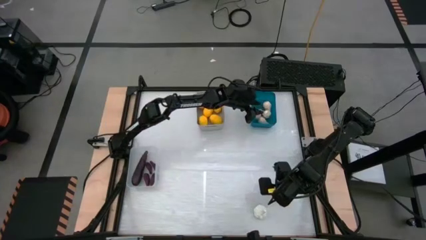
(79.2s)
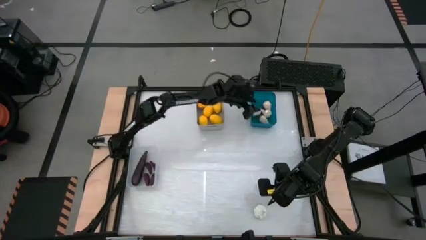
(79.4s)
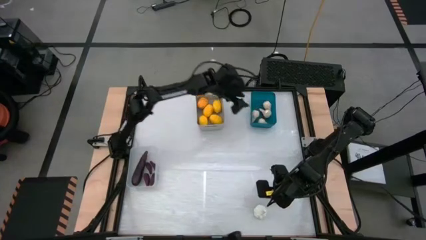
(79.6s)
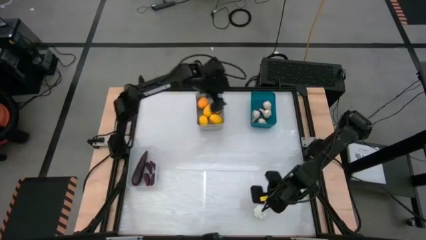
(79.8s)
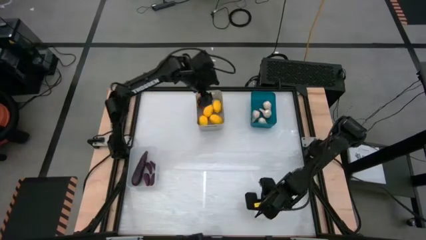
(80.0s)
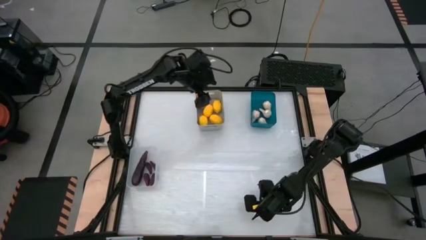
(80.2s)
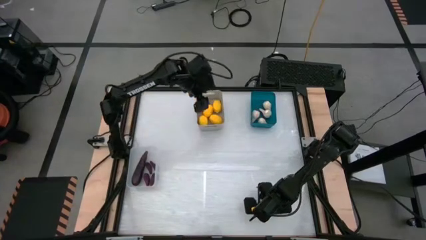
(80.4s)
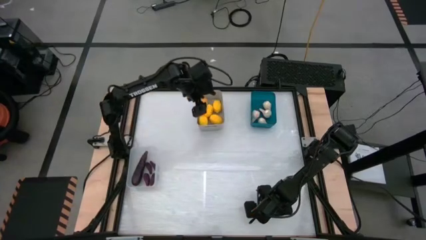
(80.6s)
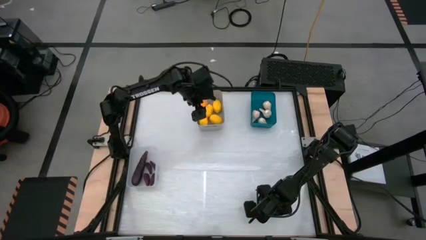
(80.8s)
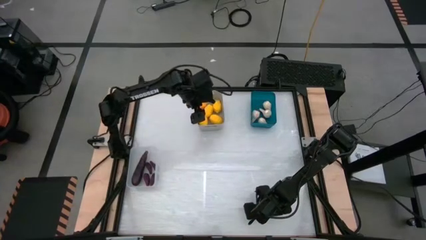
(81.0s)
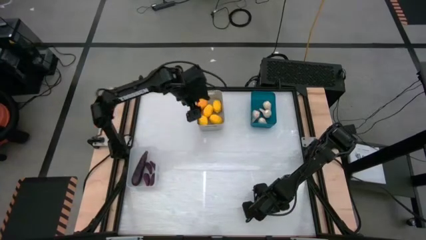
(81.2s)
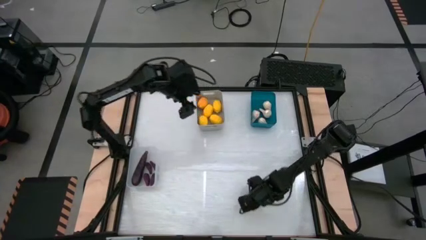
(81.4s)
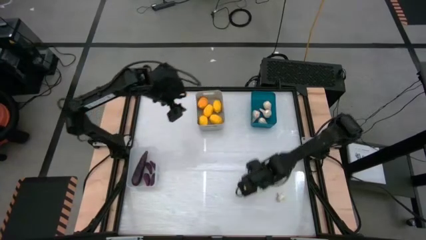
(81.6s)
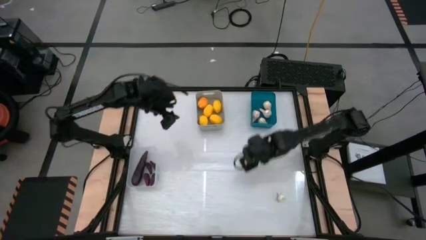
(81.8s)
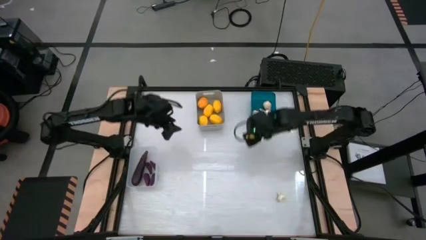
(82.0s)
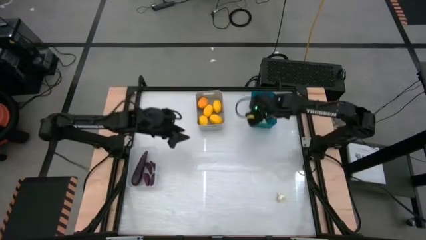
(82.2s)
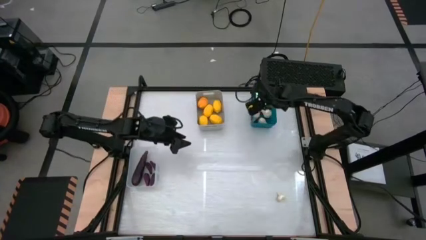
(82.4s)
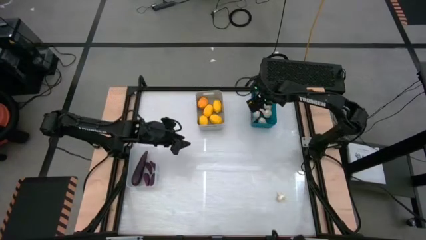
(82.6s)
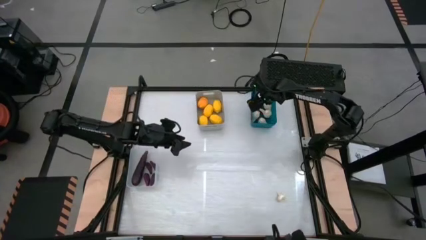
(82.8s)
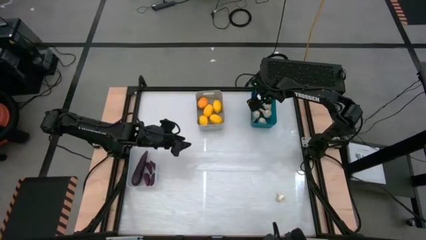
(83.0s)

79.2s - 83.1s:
Task: Sort produce into baskets
Put the white garlic into the blue bin

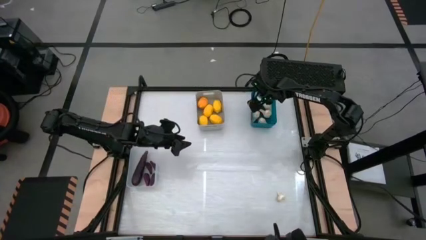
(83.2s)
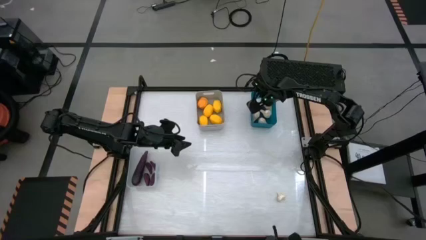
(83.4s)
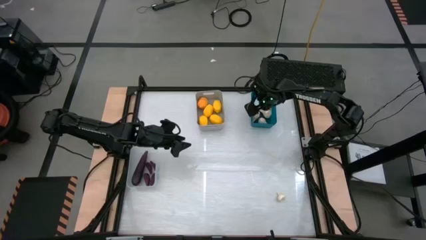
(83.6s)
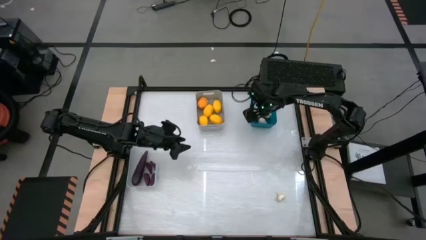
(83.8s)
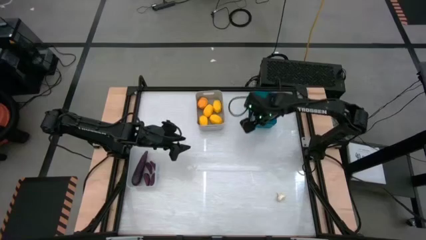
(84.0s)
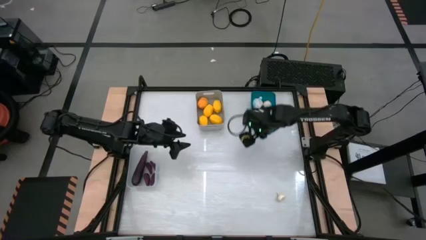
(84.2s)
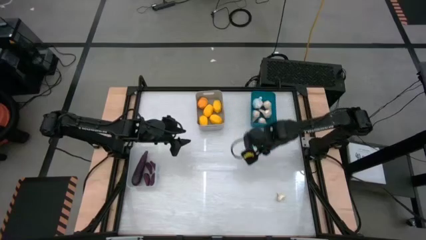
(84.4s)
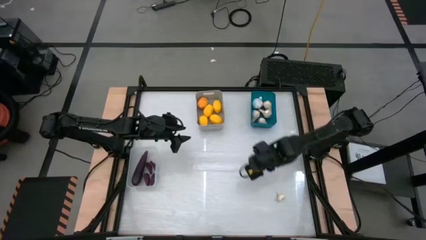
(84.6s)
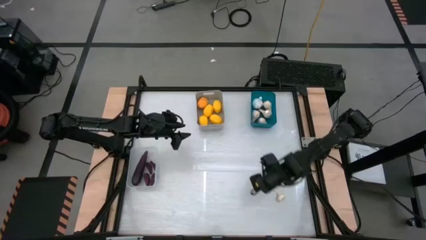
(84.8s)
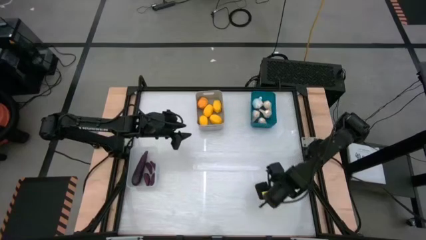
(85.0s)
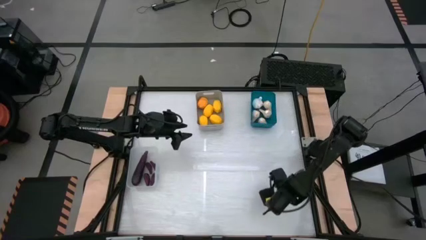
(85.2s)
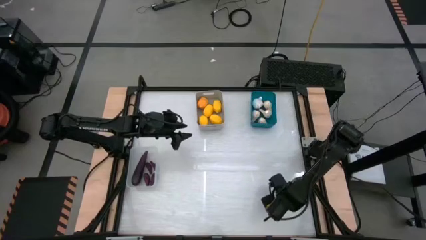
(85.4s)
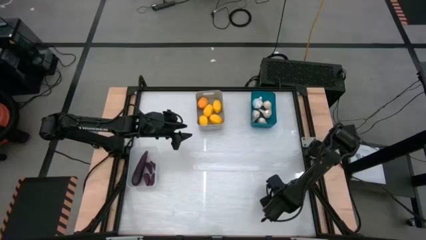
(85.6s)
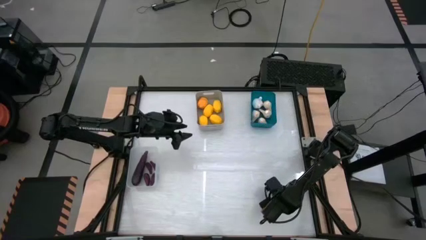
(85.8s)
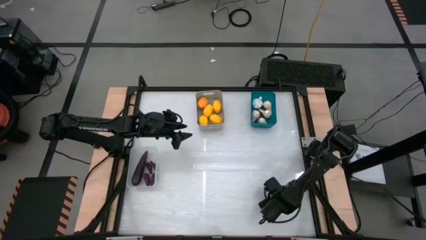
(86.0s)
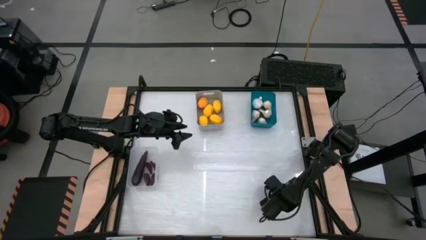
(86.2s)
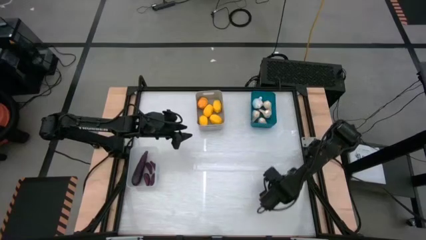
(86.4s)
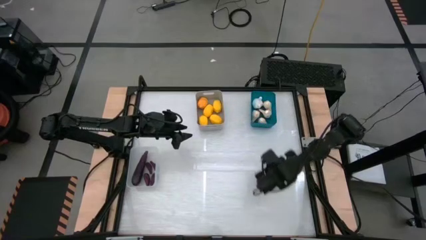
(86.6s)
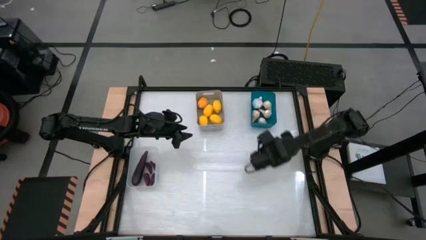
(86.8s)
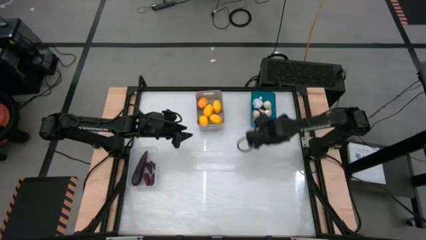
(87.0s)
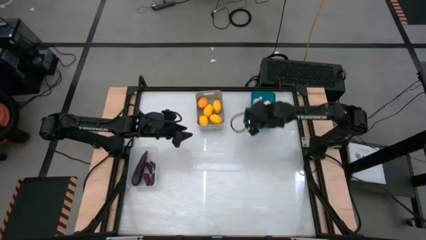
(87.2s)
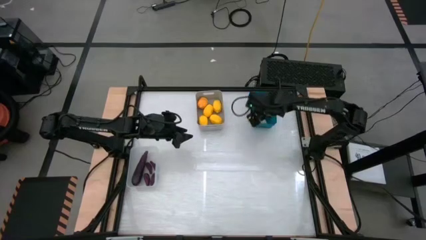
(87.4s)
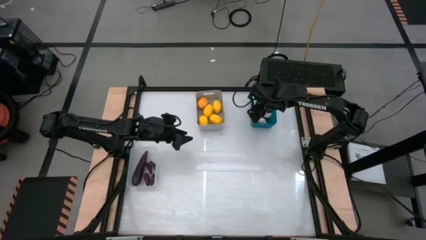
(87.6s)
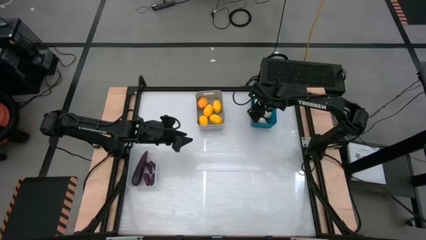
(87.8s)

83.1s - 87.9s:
Put the white garlic into the blue bin

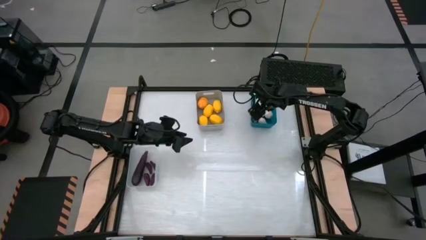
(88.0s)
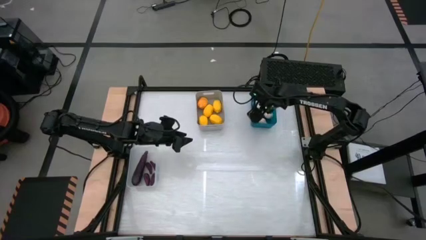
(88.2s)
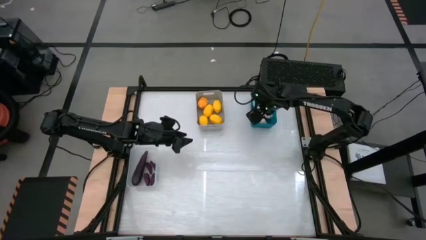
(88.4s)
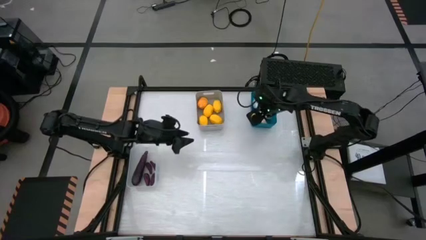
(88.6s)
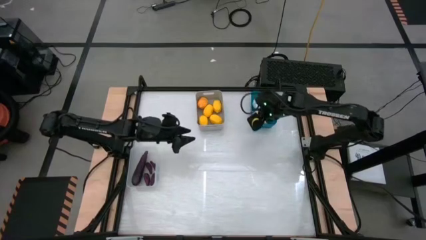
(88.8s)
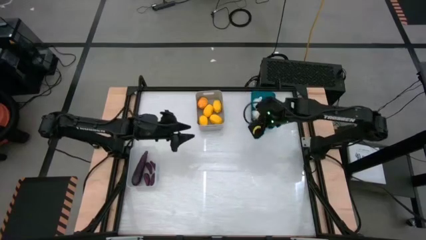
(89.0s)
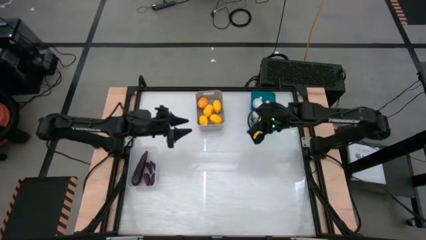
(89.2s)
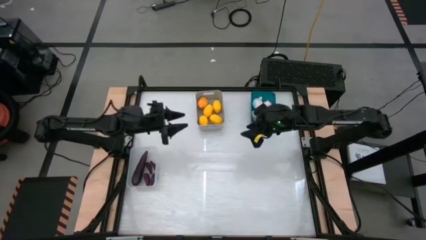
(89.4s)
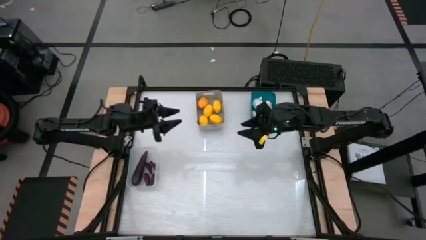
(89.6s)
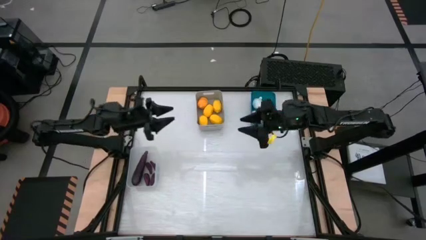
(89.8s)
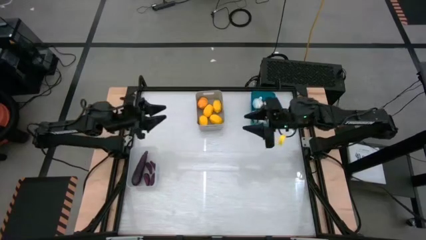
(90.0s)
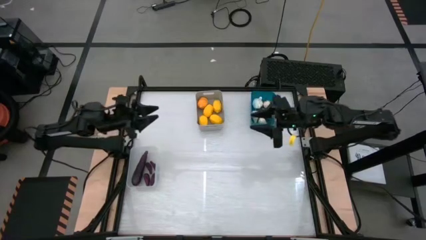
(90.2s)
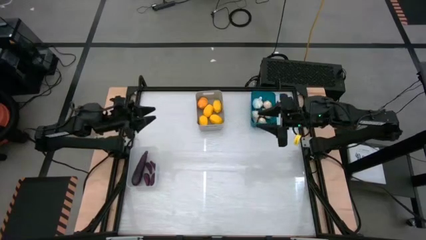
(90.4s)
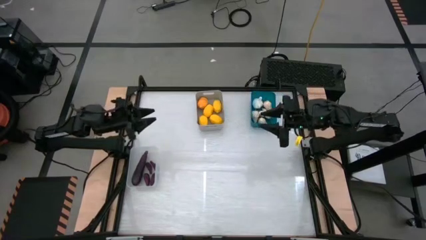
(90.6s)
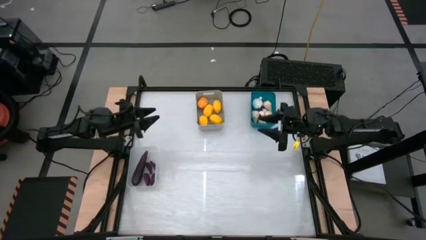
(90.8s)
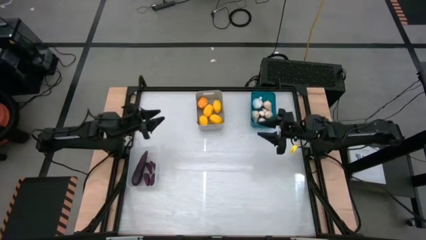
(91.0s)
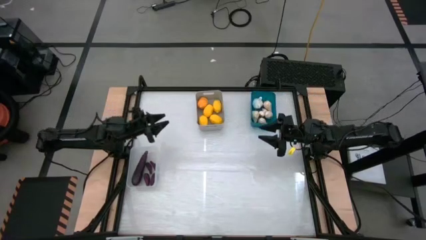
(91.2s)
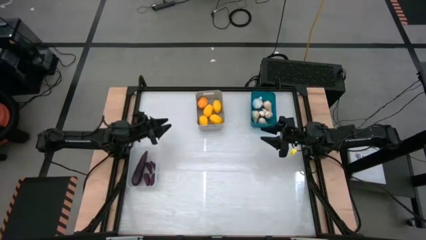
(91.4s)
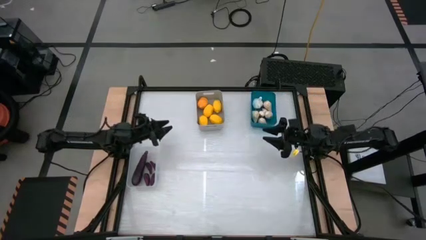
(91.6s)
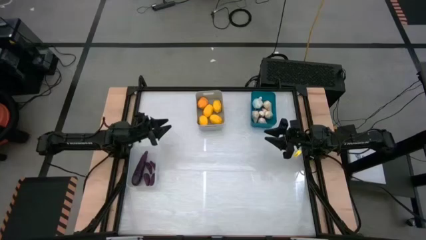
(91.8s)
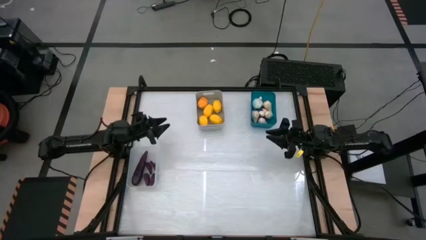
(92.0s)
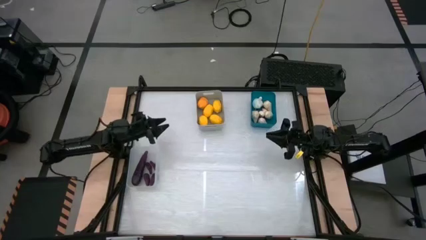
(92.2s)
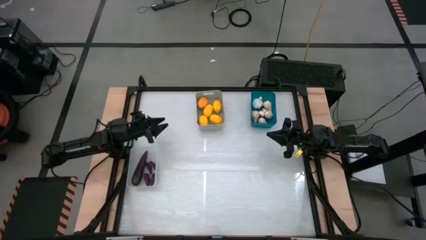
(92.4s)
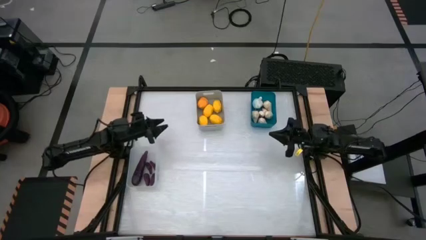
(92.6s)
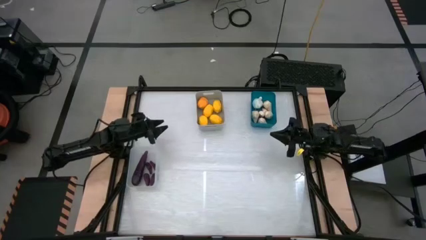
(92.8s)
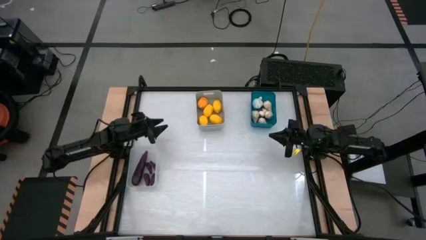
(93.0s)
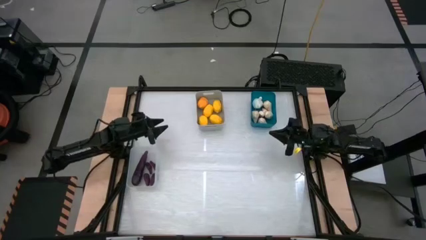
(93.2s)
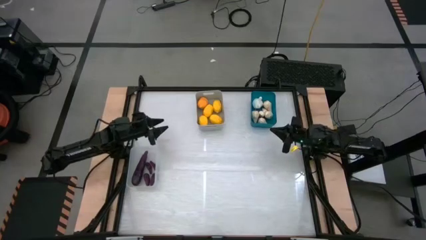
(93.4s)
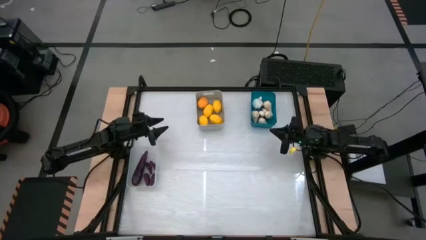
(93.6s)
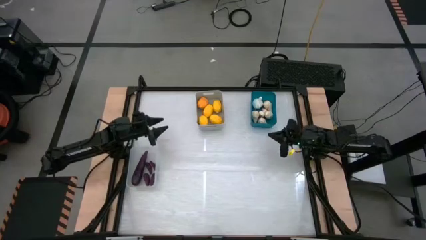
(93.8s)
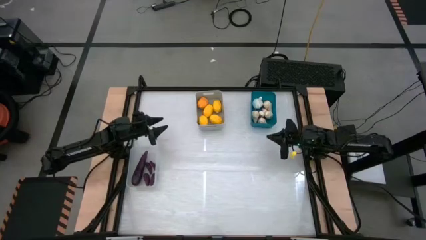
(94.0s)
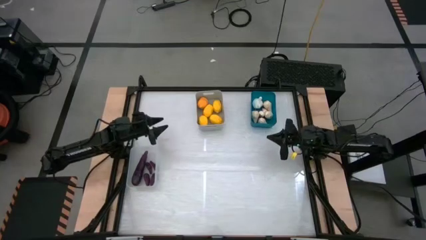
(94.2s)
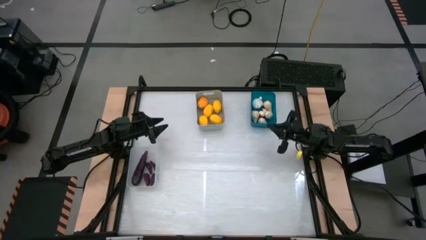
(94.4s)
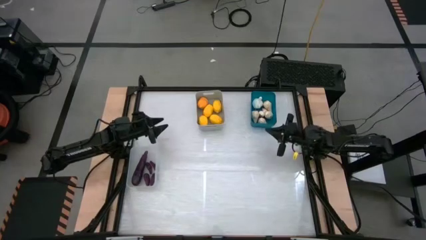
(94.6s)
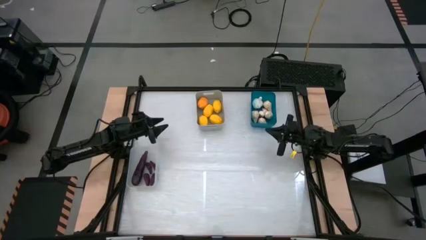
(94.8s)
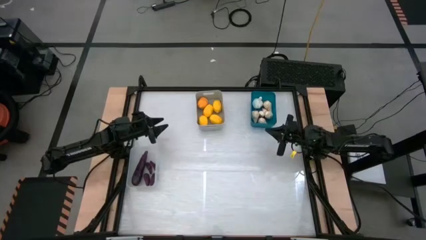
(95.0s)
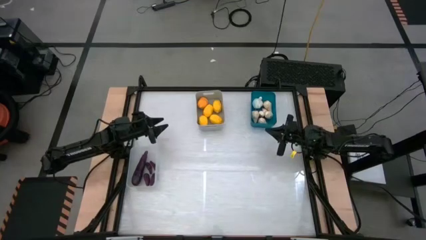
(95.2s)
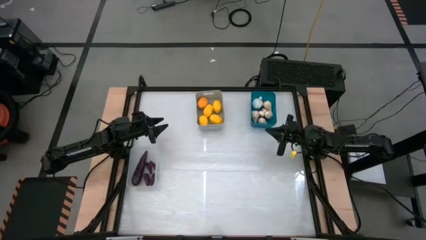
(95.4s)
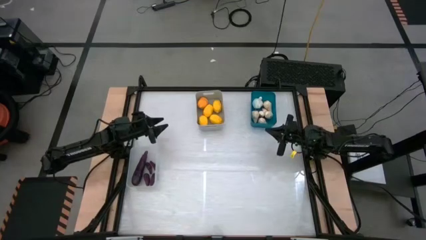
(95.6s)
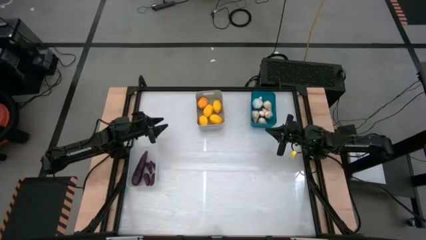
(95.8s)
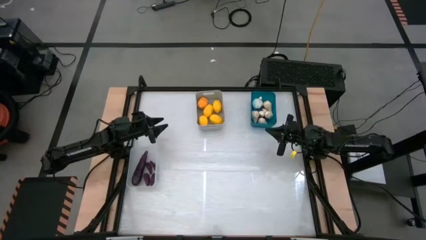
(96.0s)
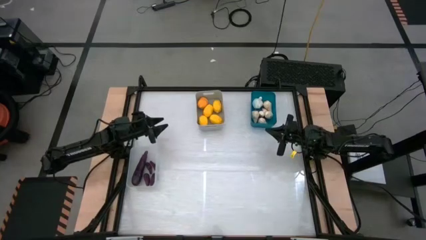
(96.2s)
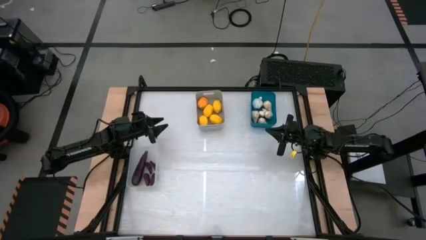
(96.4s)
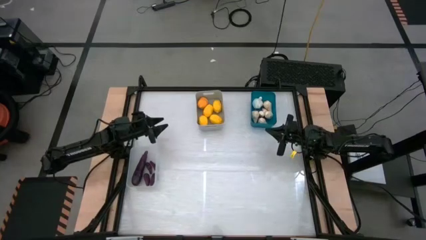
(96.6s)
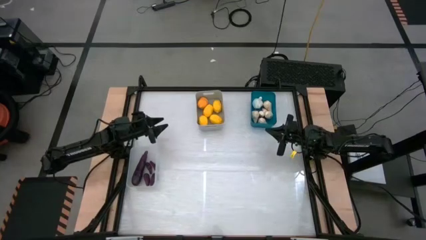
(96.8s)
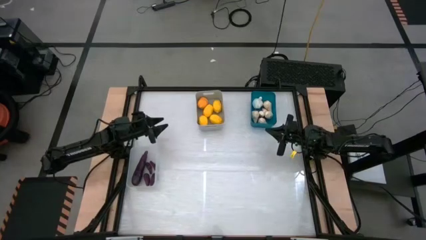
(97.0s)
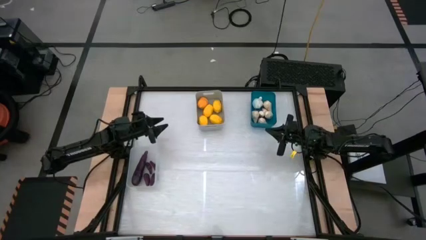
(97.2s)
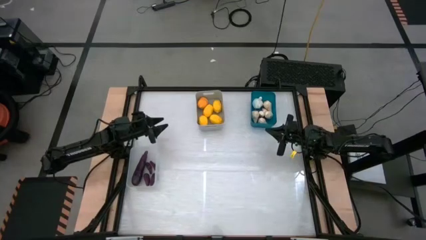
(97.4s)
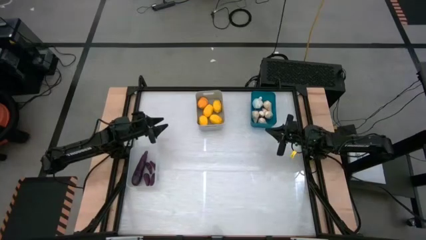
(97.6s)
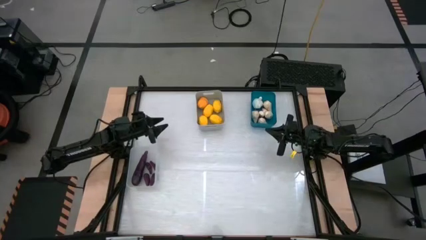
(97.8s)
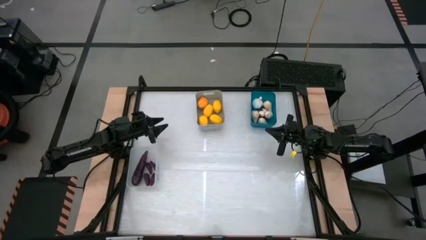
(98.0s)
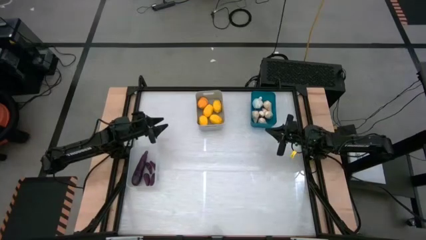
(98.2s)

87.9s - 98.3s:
Return to Home Position
